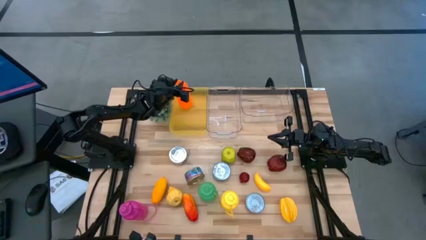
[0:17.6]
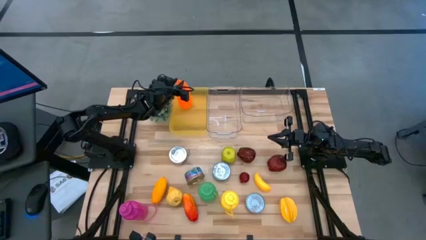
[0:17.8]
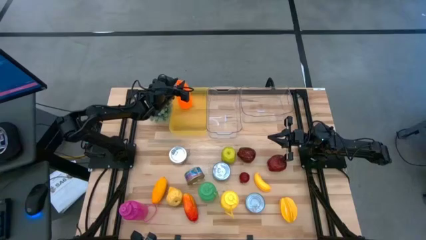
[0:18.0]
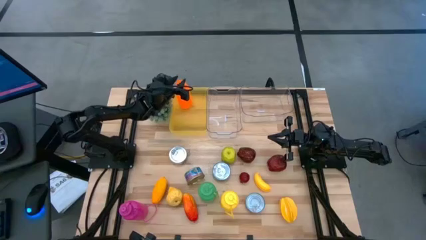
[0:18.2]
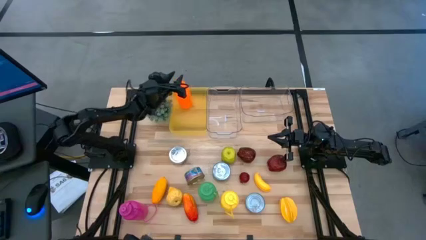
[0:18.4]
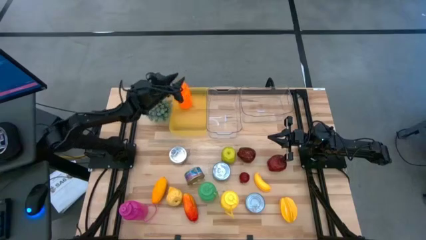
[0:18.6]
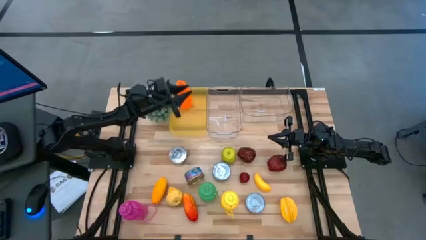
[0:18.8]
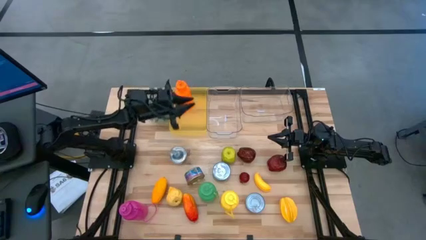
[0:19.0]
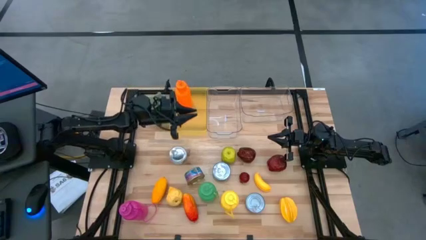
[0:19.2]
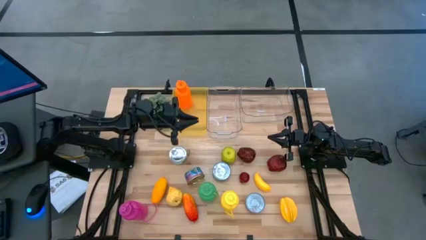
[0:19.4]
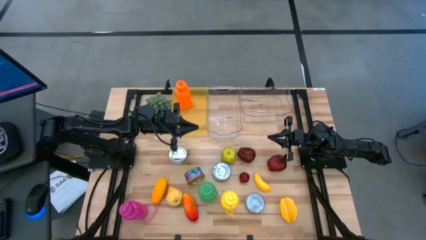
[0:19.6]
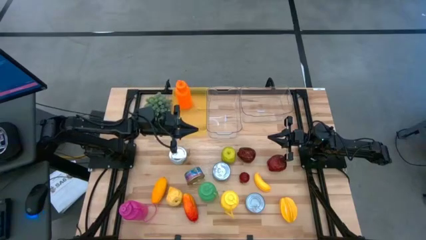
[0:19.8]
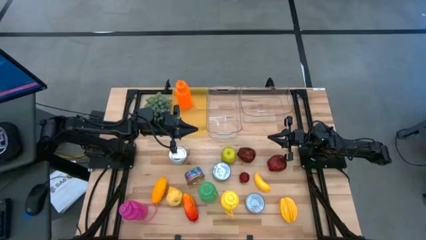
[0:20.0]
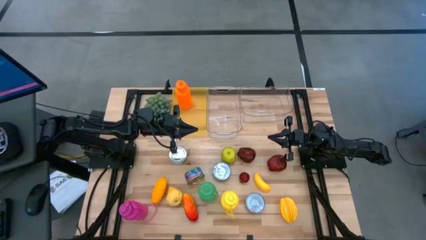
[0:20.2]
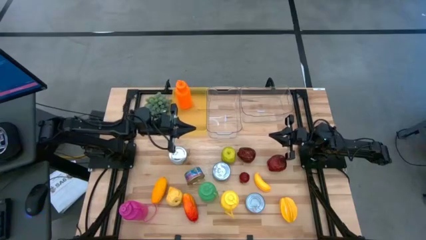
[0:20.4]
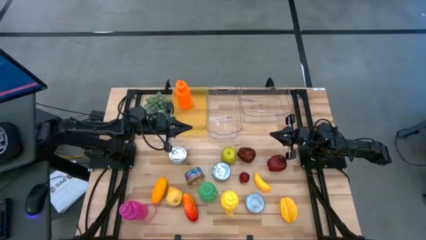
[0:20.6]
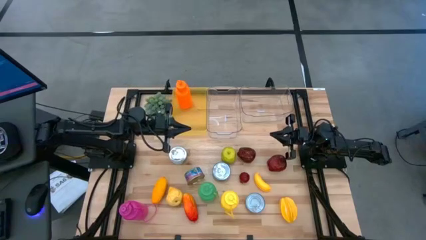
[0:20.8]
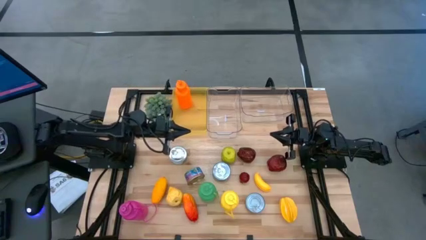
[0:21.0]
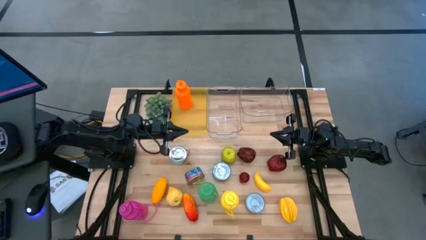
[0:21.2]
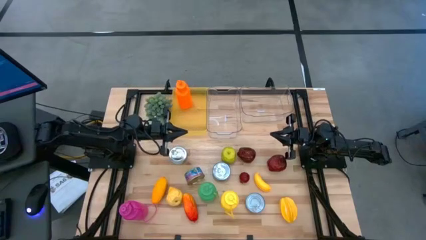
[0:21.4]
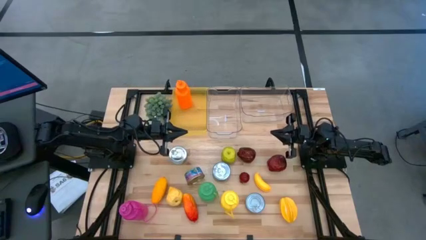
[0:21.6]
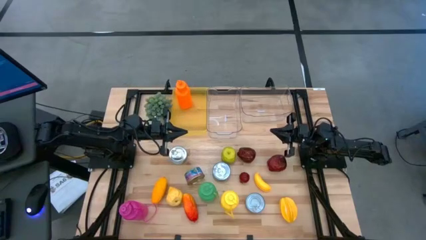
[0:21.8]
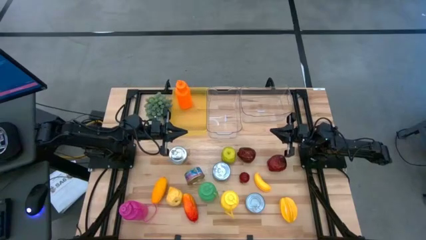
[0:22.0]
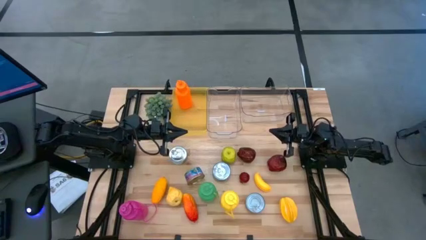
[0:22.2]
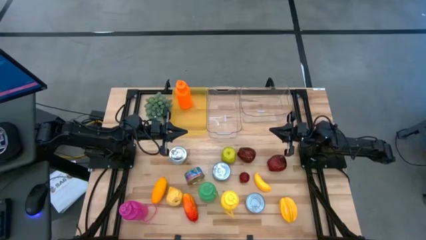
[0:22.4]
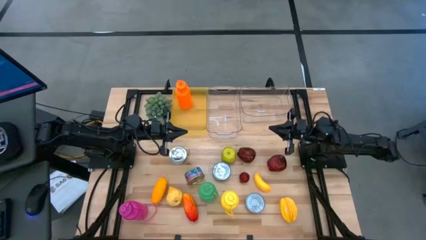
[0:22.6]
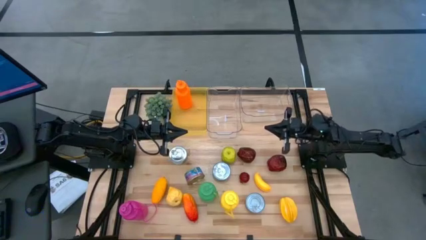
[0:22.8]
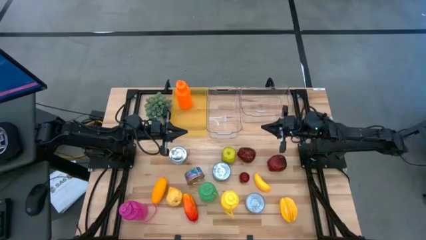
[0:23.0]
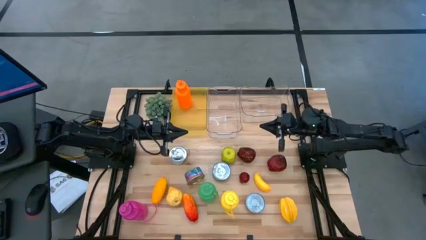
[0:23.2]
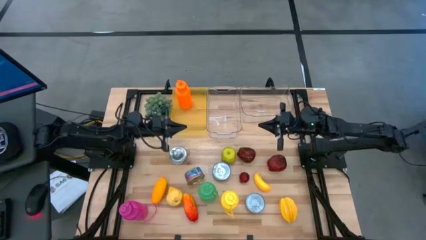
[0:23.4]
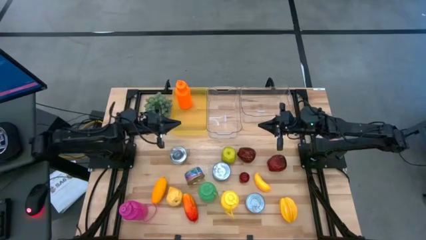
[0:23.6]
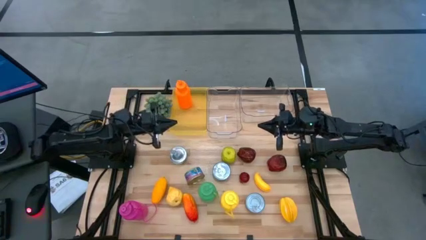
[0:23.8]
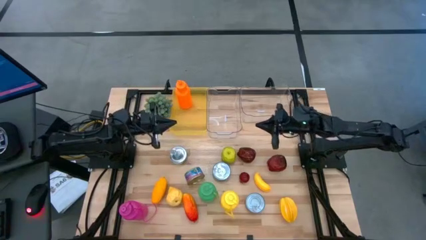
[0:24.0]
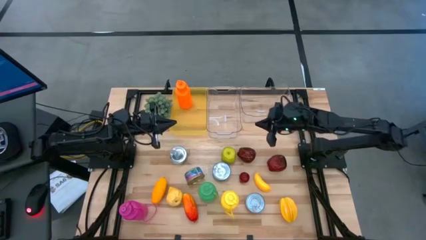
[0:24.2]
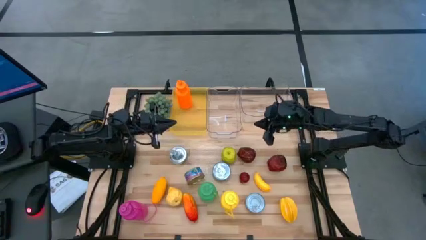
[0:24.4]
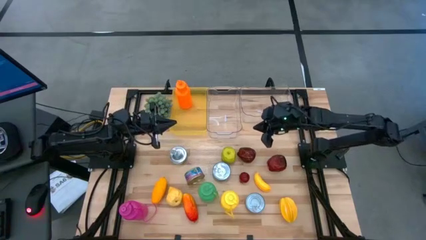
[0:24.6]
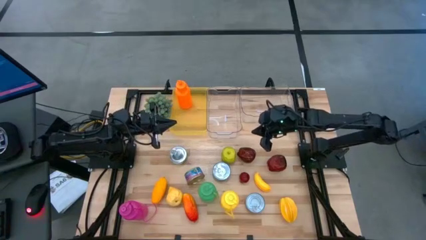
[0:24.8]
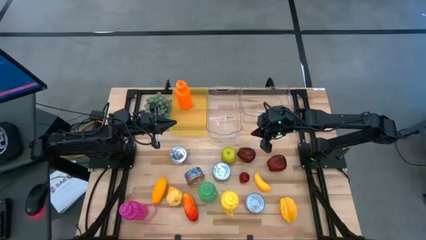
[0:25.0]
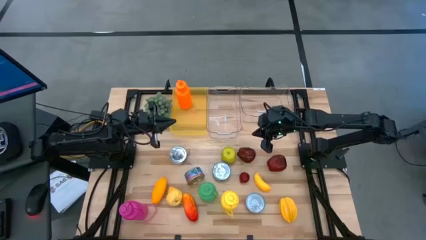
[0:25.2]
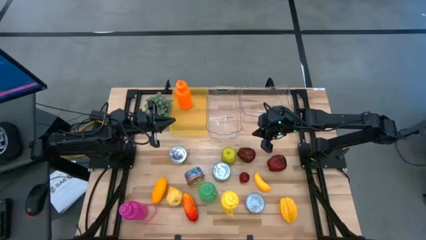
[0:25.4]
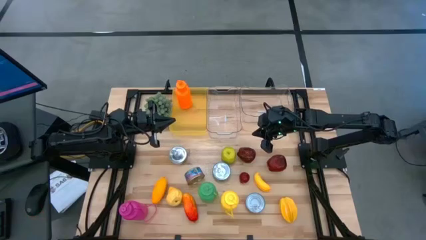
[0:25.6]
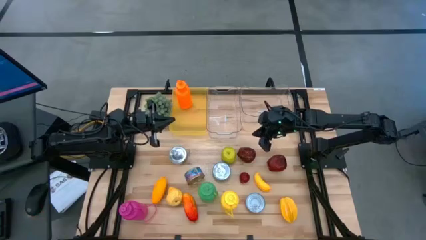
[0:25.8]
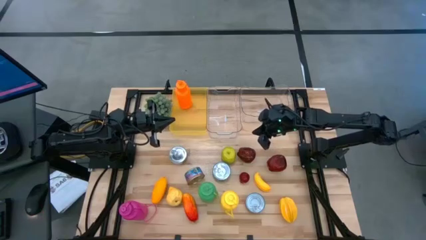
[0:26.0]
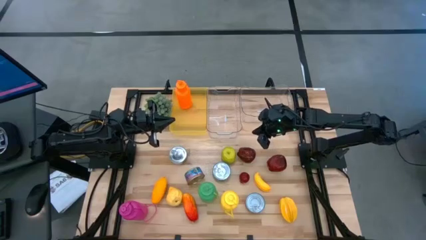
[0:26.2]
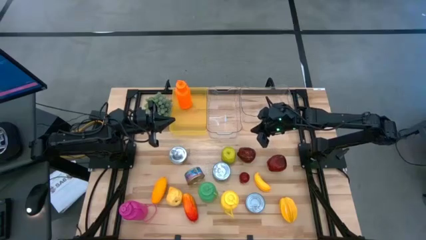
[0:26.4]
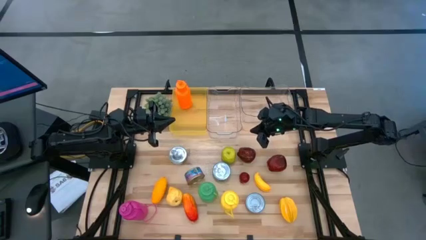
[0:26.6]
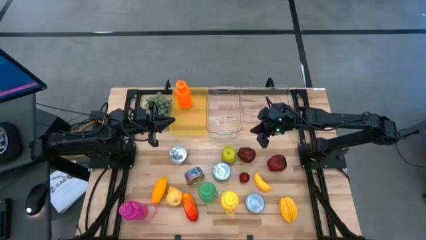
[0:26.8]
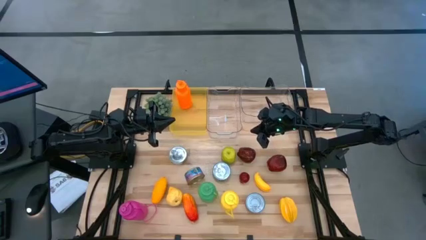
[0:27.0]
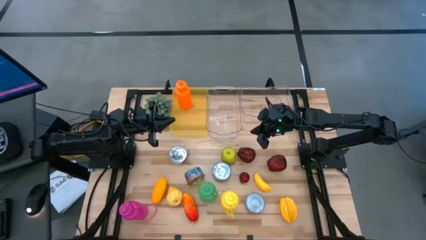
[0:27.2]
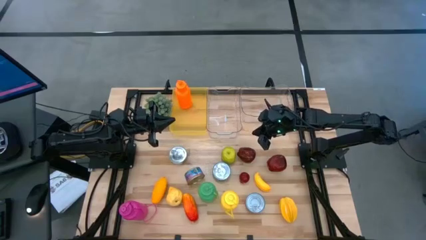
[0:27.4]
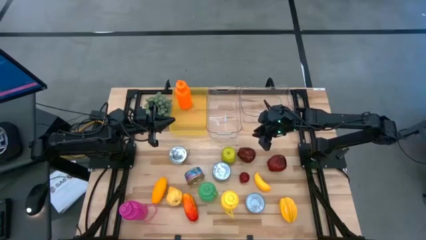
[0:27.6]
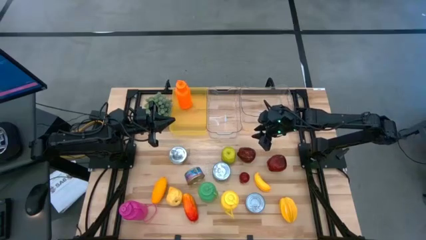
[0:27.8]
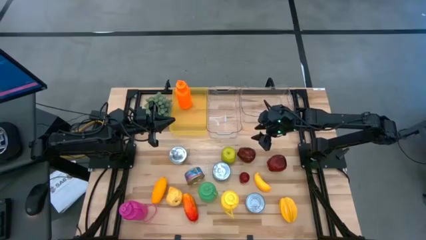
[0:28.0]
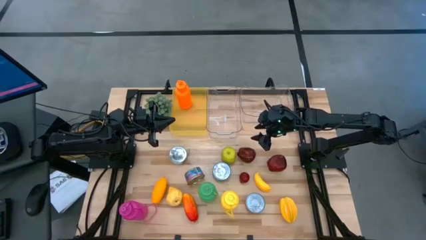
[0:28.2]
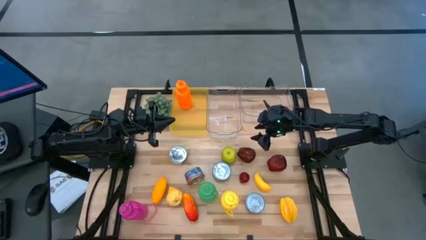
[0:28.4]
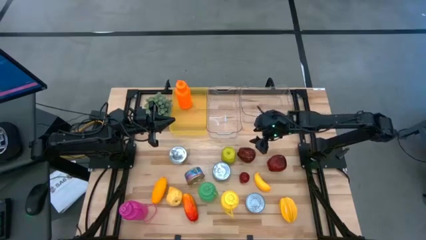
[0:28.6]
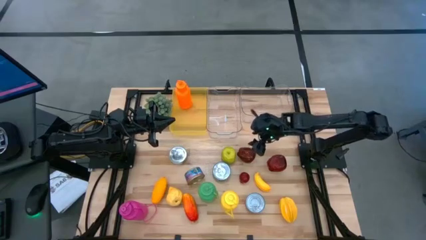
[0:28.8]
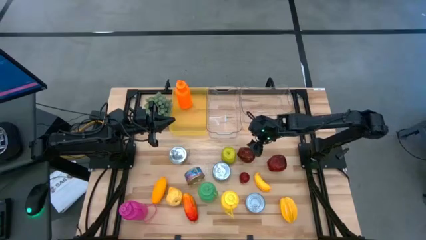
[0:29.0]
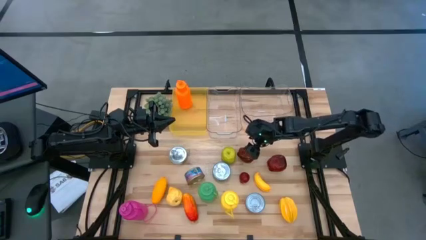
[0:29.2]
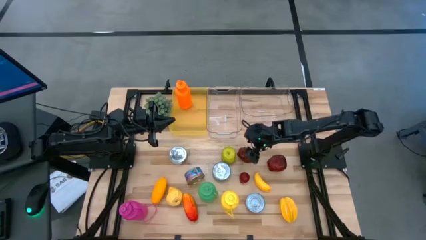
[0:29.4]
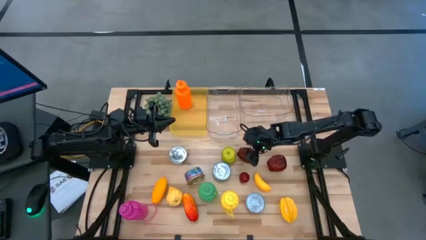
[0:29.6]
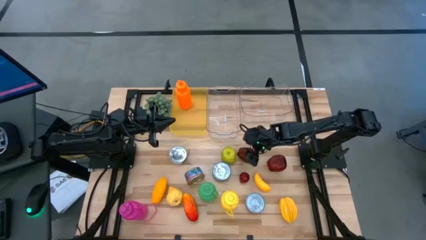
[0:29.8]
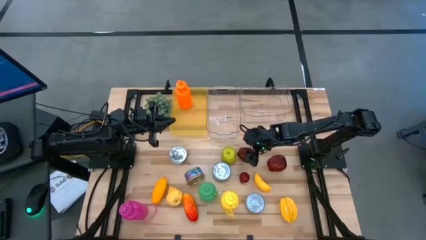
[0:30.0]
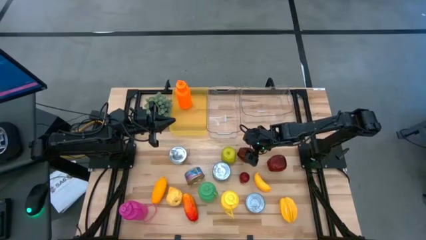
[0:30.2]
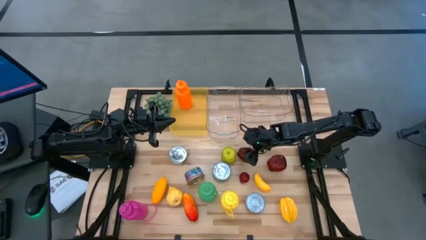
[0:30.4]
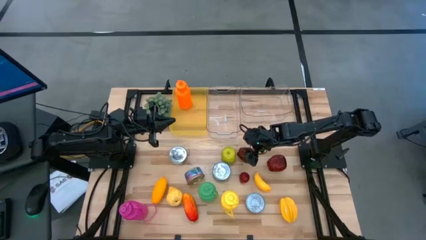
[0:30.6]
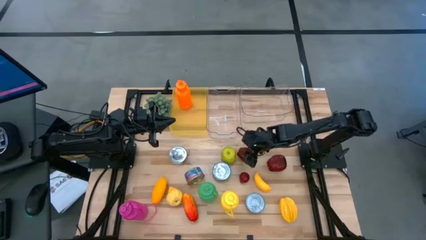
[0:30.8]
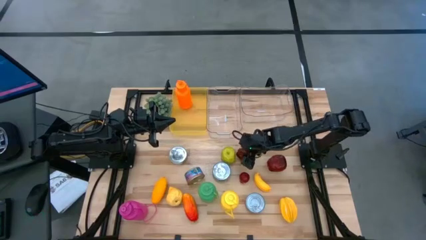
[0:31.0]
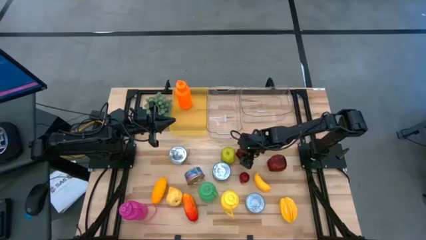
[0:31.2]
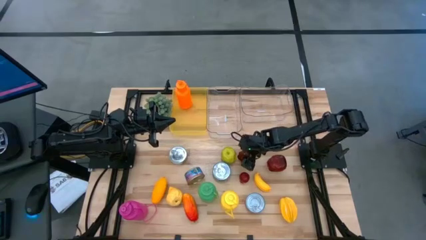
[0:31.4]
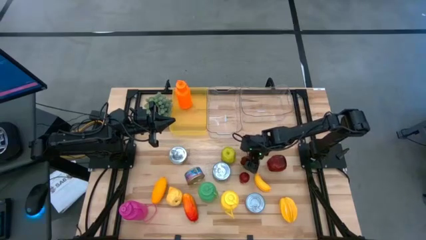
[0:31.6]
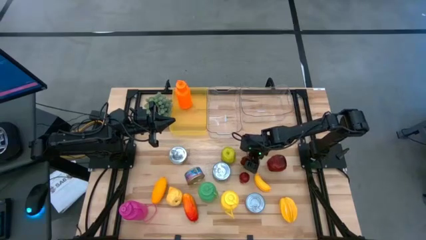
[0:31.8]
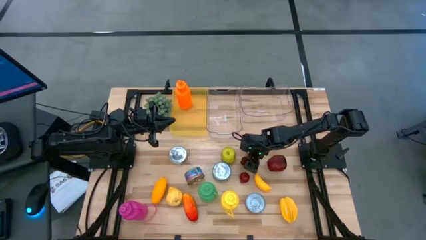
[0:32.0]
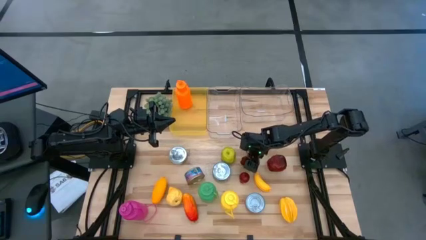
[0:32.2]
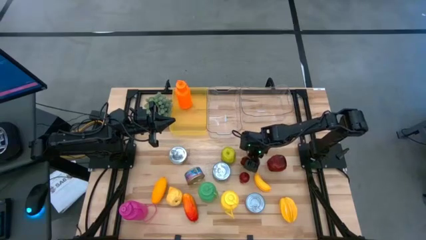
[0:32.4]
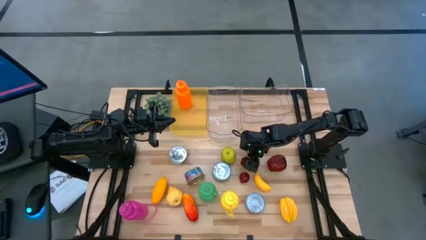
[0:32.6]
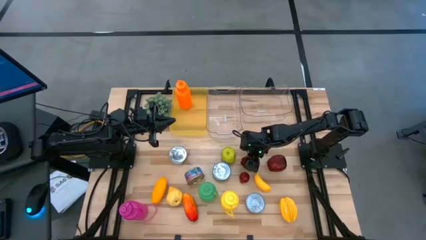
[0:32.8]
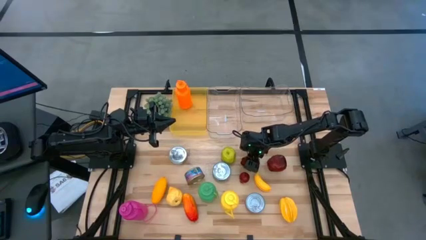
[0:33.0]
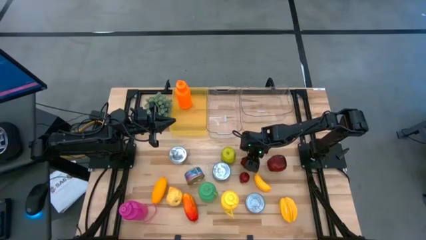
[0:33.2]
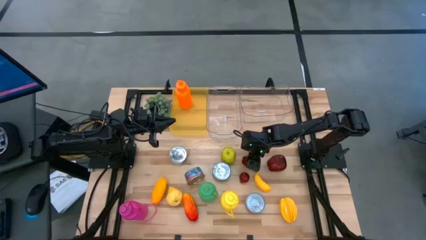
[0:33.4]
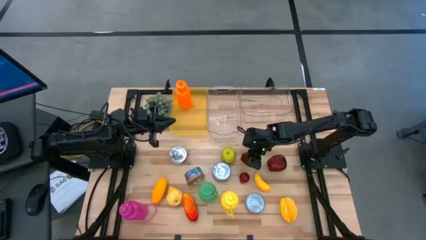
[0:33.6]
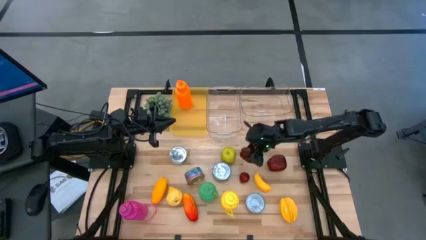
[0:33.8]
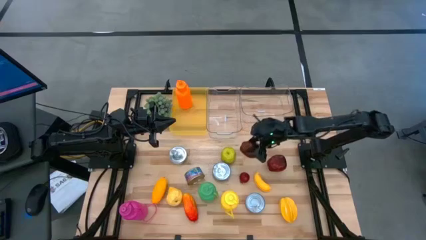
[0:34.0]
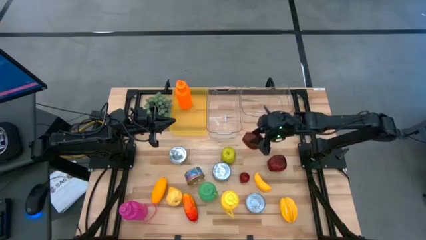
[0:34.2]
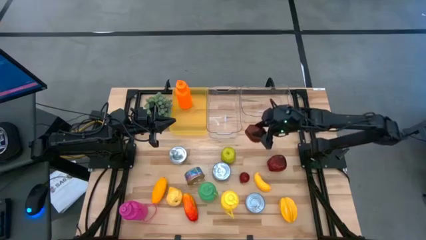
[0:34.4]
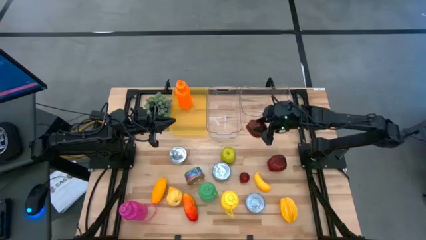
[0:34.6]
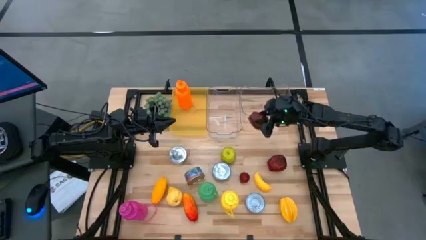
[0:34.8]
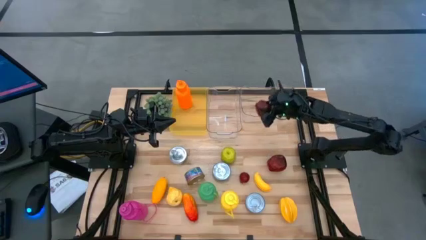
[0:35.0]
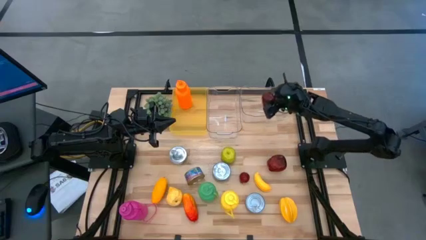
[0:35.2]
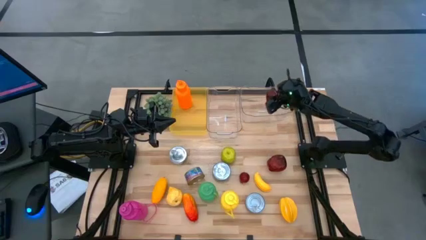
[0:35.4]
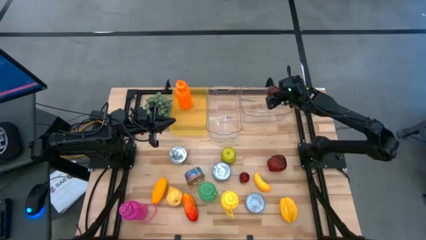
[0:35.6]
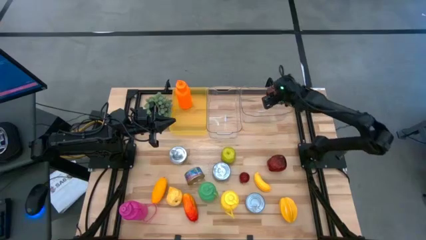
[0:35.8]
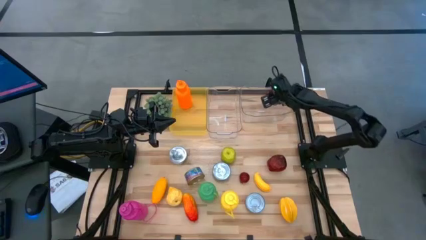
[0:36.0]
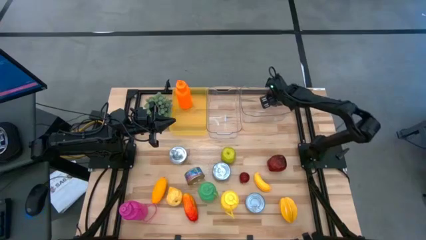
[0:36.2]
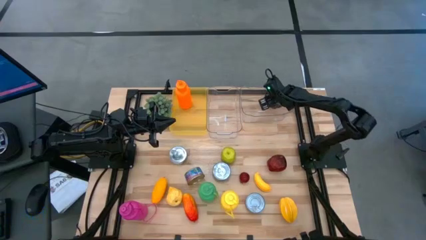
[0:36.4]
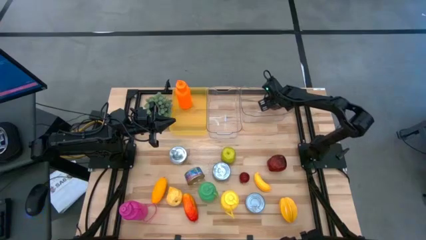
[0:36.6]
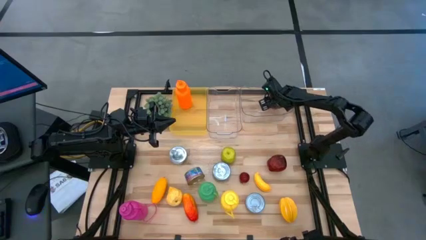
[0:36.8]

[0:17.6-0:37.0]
Task: Pick & Place Food Item
Put the red apple into the right transparent bin
